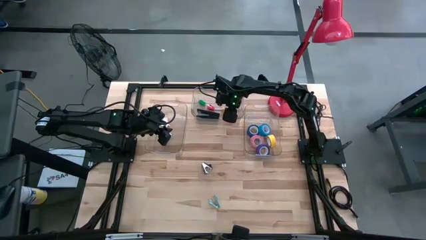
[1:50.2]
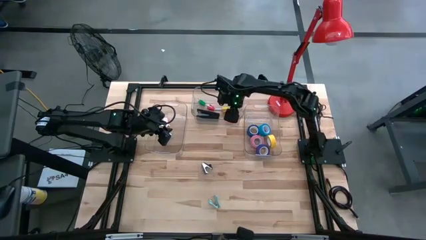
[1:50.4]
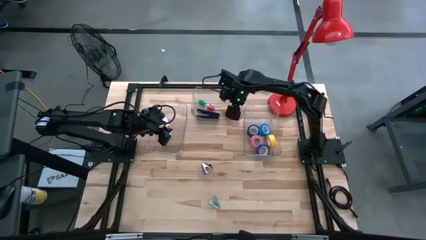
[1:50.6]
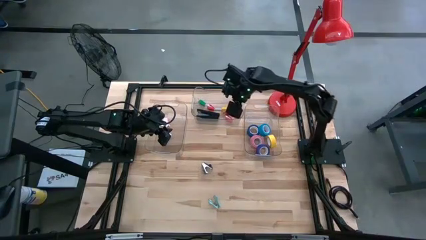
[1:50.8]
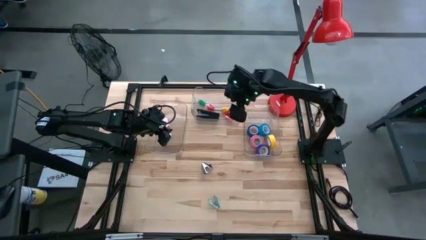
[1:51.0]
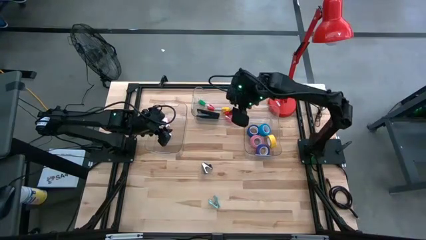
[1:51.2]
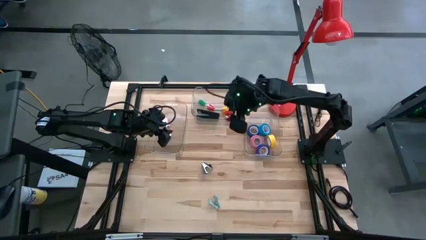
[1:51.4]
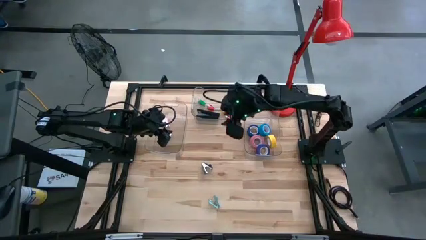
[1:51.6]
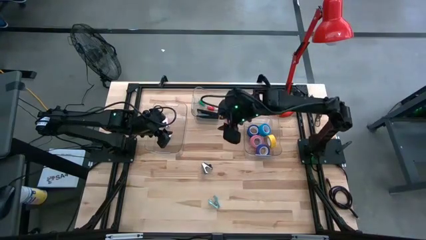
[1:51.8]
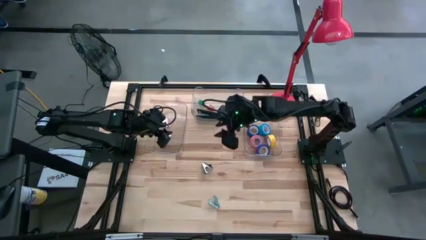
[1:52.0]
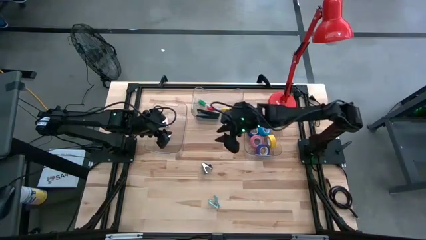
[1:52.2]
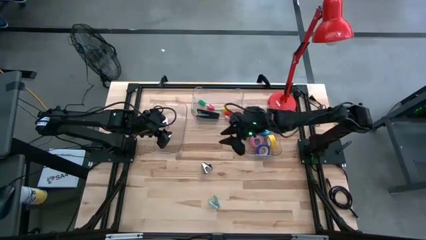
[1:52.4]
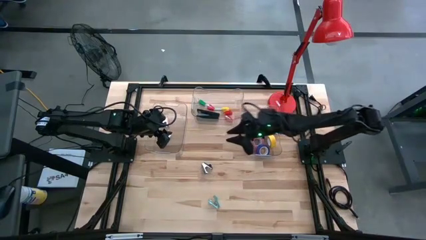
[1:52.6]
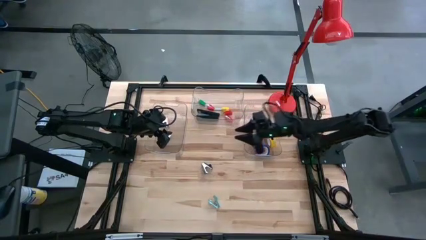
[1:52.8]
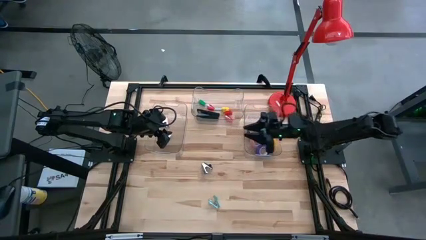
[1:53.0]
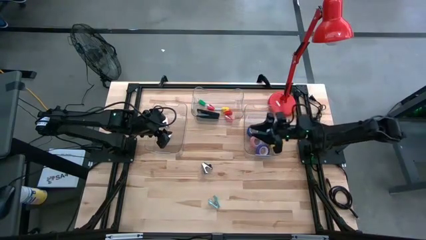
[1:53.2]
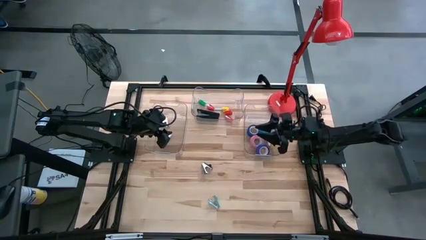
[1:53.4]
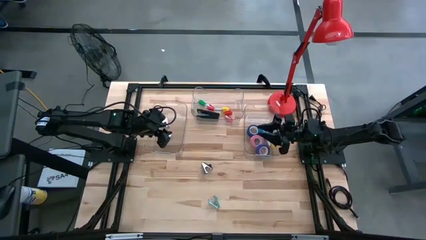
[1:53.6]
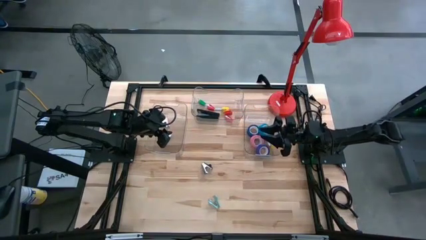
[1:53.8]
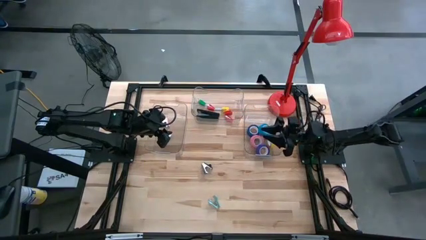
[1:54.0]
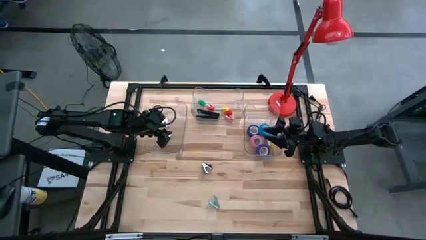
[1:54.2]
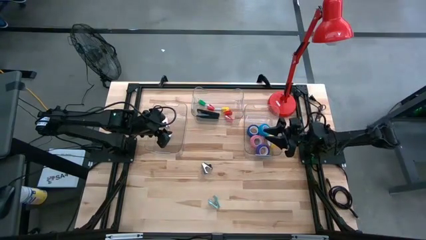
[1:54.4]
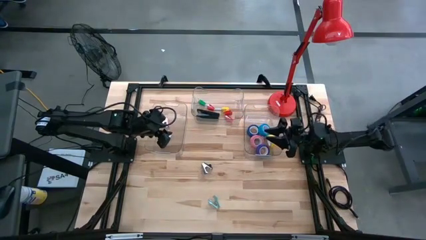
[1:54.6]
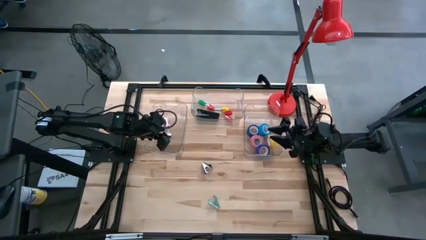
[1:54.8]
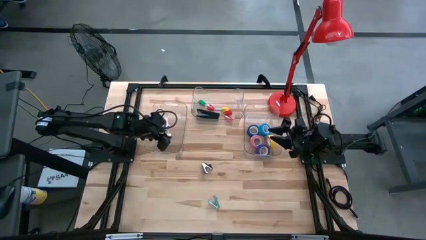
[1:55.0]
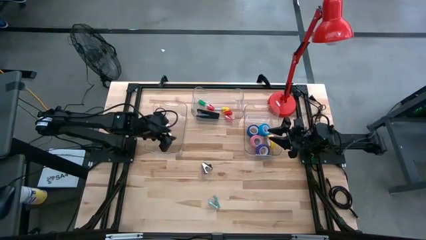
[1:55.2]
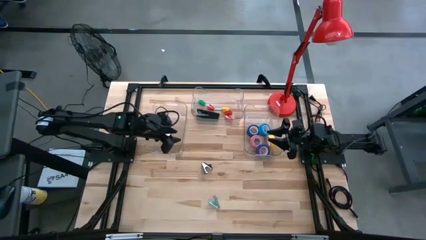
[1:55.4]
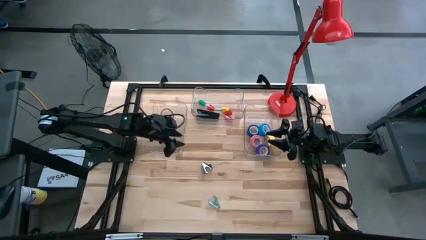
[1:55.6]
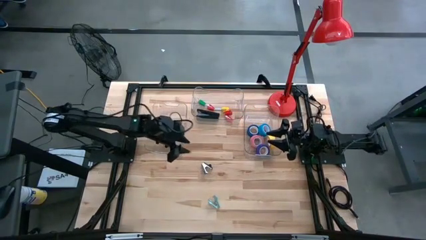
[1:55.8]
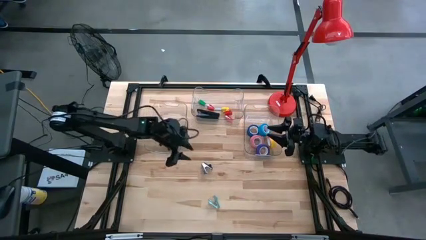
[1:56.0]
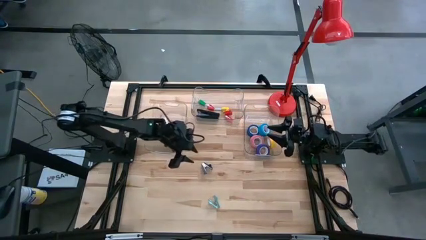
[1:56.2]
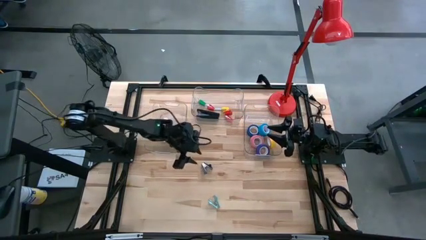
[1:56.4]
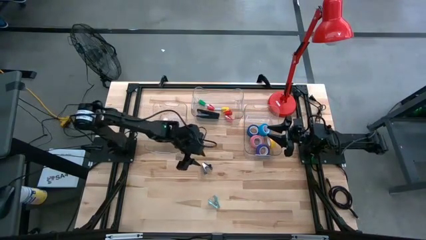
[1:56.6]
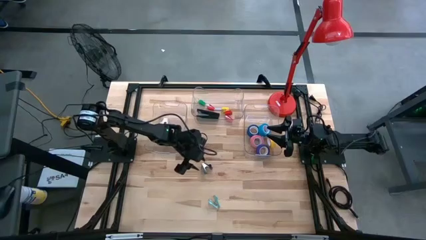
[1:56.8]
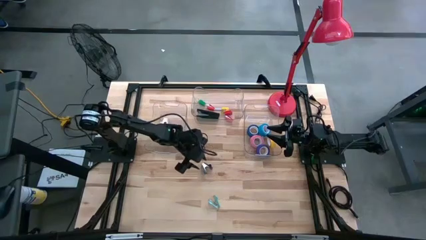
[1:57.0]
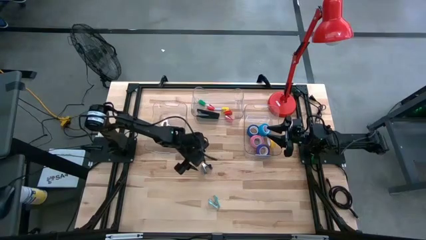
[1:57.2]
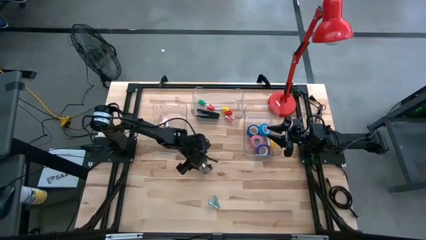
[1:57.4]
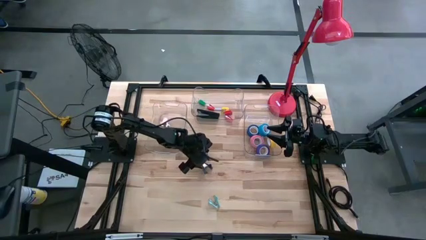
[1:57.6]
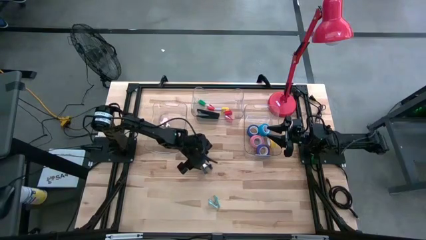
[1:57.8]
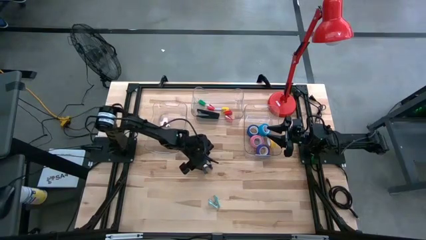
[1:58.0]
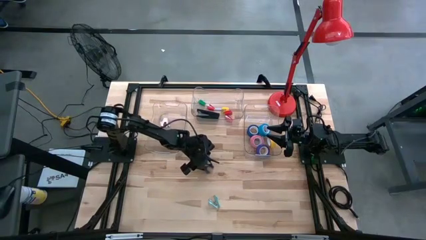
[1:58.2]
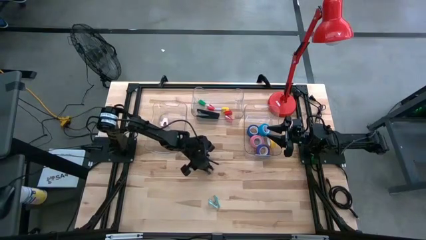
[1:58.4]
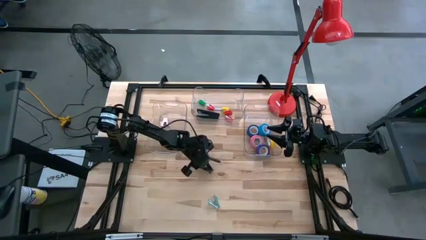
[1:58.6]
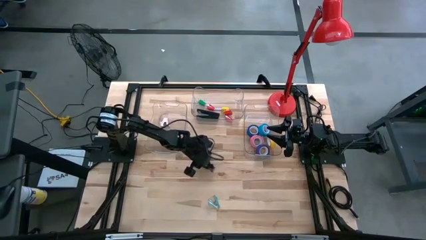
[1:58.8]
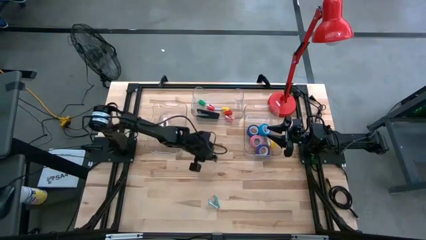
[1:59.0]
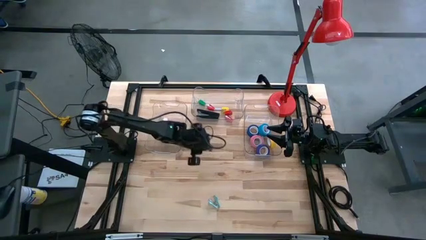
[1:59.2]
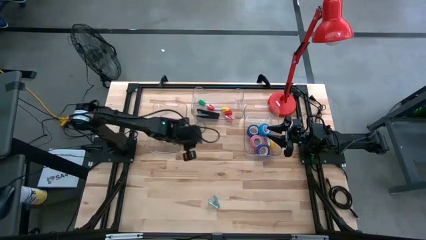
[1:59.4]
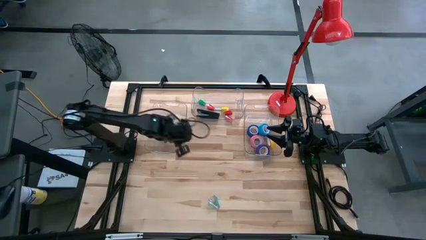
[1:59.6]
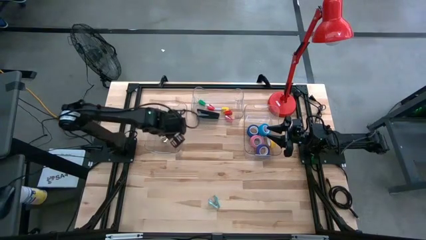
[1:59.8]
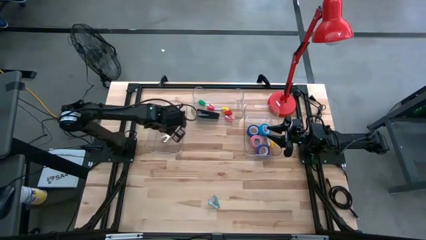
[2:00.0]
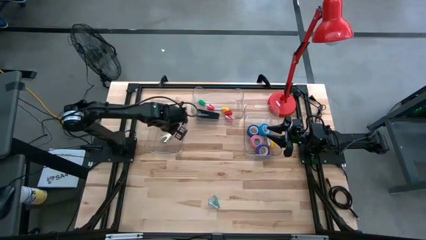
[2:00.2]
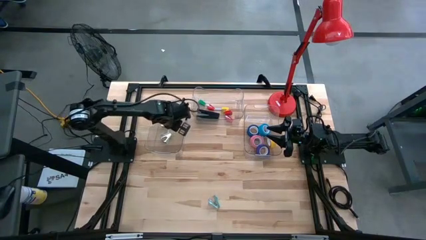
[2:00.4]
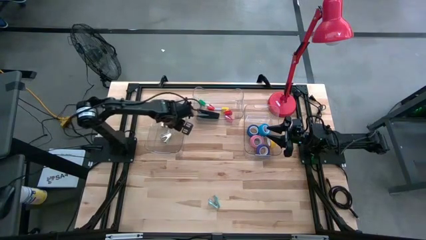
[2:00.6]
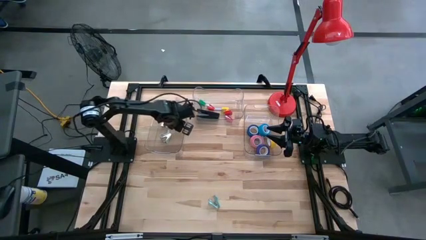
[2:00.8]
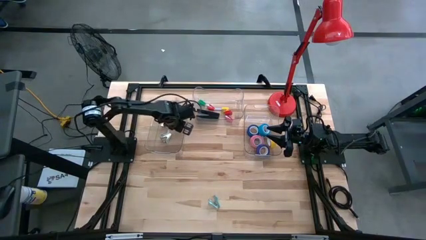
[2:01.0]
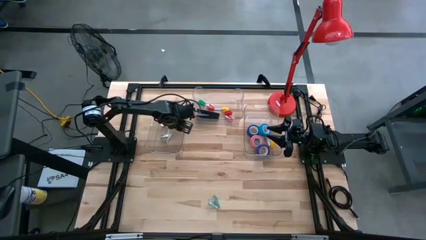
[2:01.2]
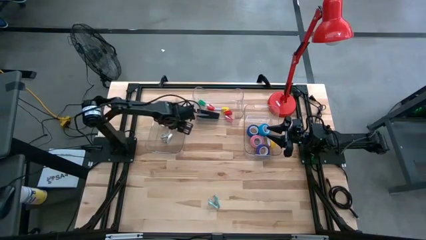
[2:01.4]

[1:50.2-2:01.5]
Task: Pick and place Stapler, Stapler remover, tape
Put the black staple remover into the bottom left transparent bin

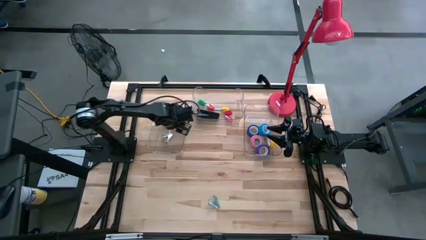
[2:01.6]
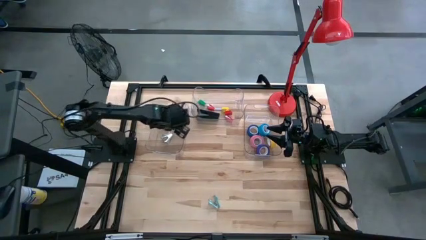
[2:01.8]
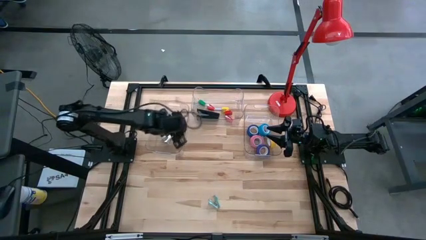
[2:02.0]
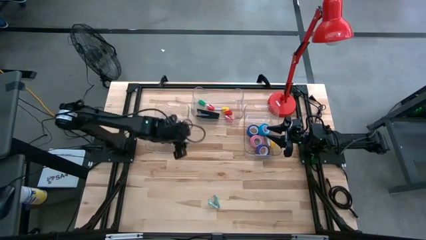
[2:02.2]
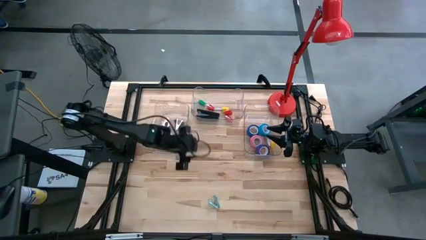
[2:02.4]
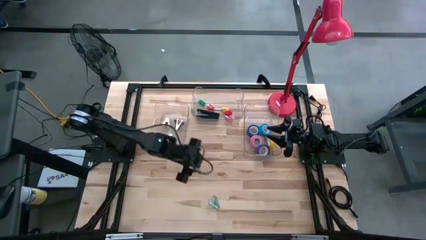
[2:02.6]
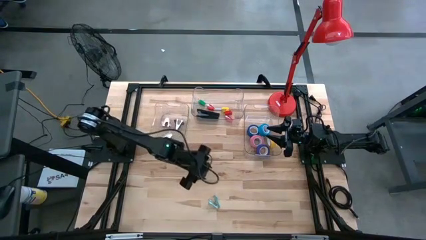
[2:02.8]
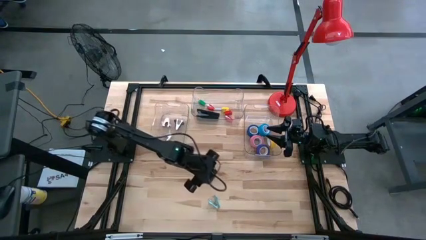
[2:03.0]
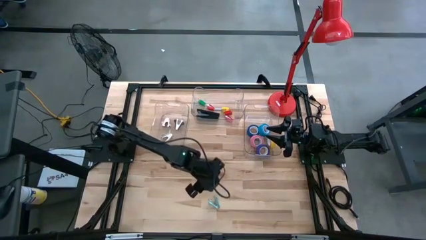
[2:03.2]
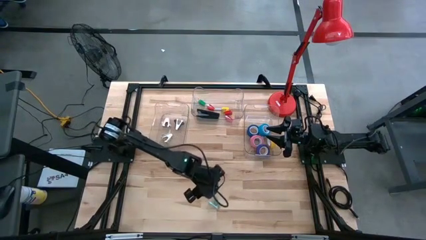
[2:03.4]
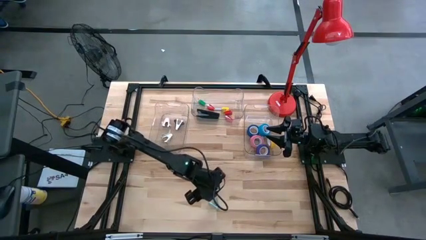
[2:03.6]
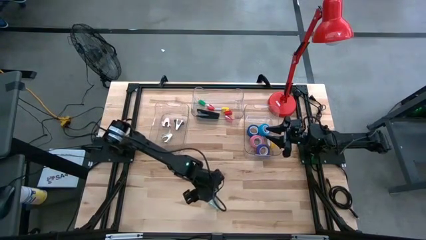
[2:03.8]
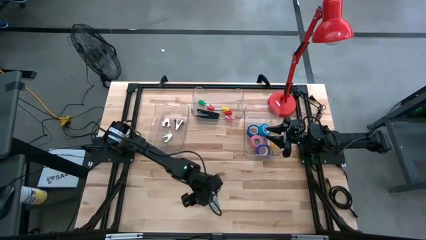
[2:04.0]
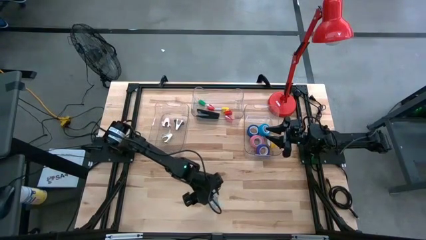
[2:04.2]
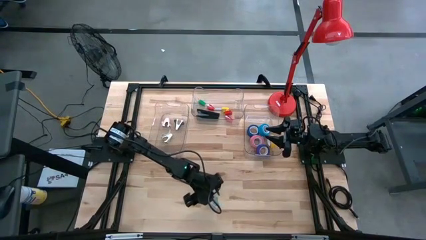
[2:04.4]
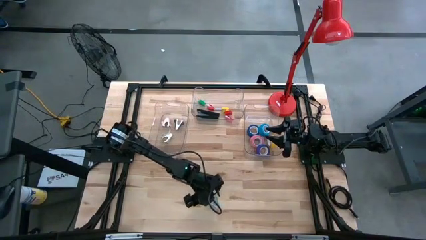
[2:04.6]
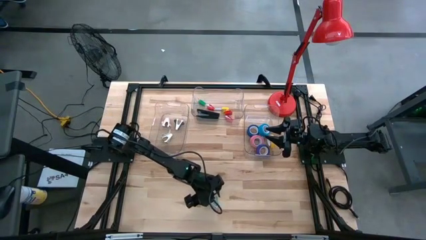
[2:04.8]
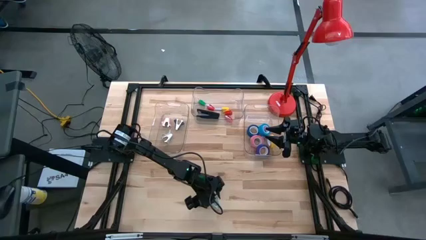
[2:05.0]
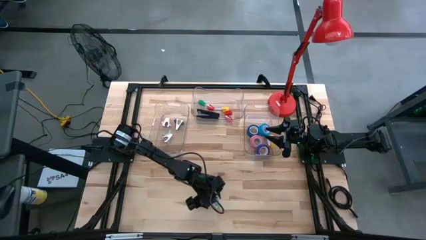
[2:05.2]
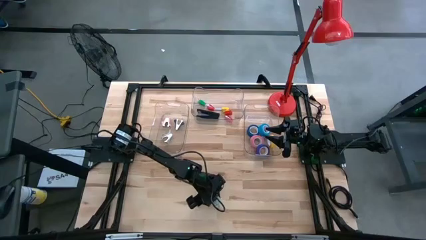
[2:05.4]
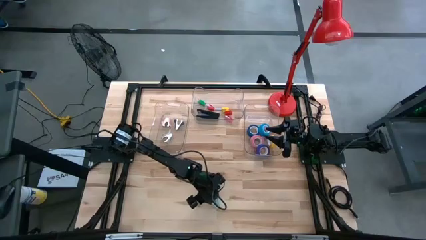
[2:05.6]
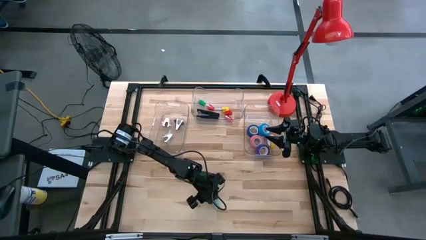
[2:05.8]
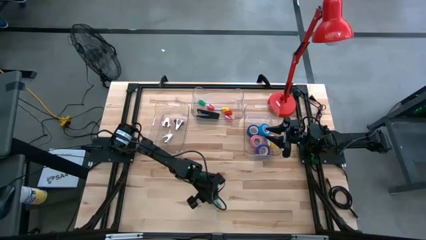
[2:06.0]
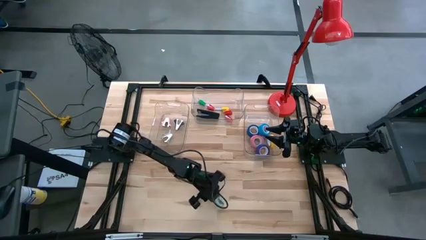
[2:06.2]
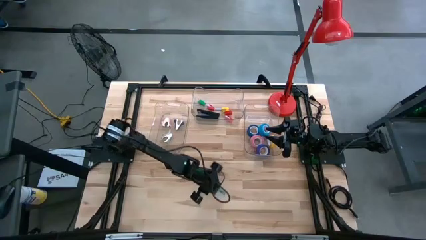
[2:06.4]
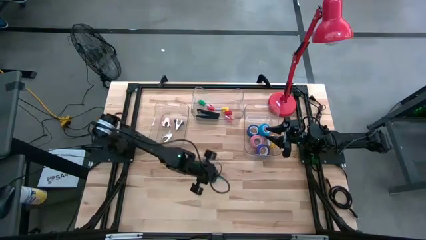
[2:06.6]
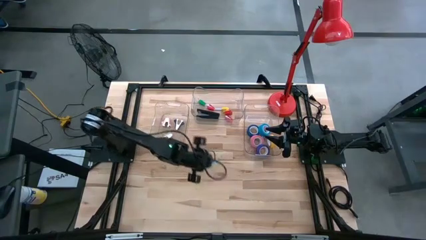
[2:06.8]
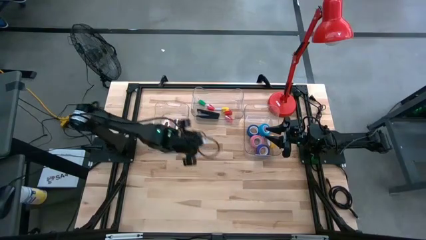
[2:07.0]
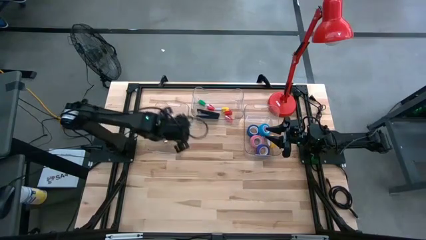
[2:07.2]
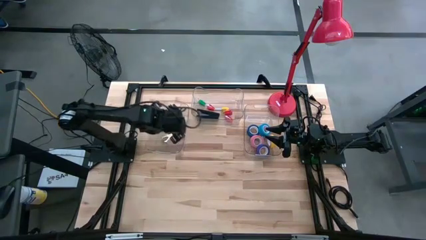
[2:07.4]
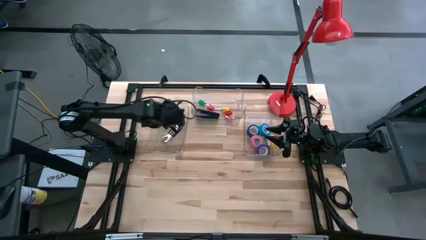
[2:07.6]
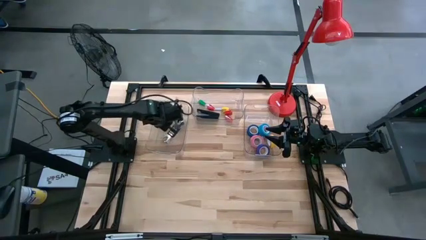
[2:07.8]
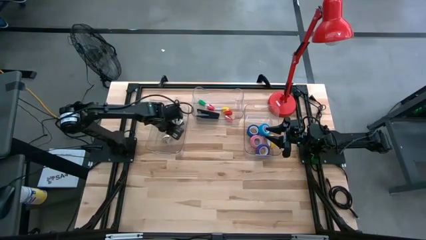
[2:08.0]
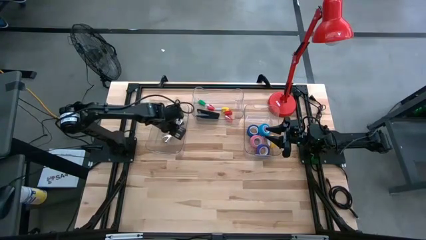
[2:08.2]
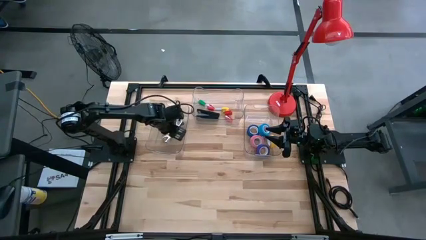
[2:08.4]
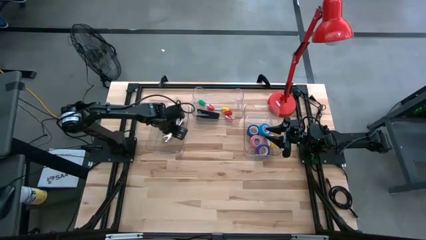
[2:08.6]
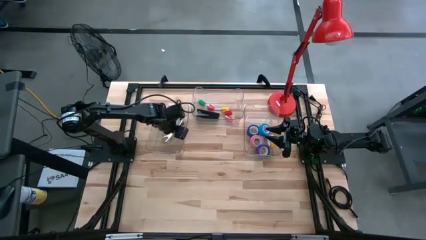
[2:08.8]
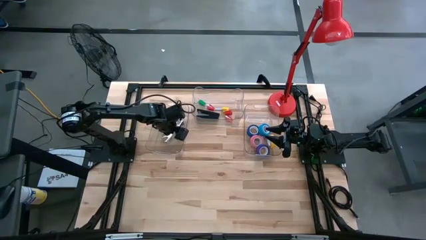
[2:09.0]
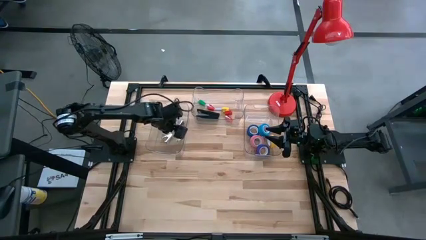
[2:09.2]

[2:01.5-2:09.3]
Put the light blue staple remover into the bottom left transparent bin
